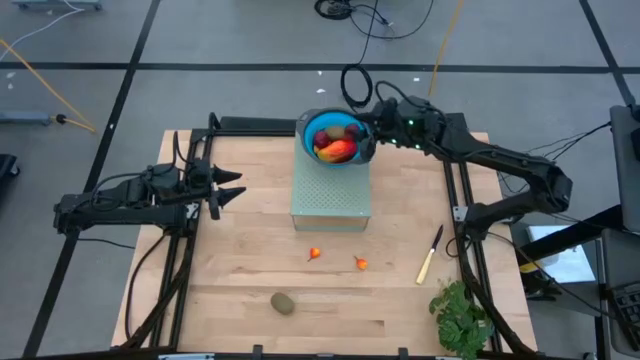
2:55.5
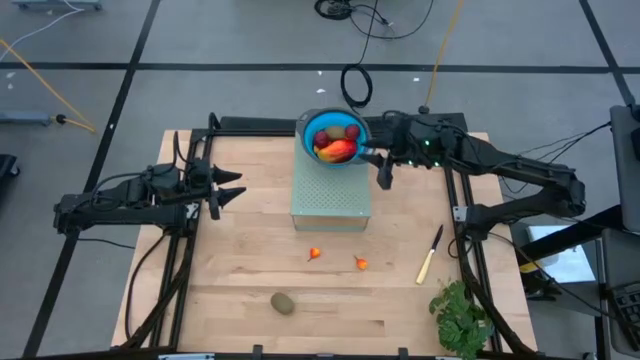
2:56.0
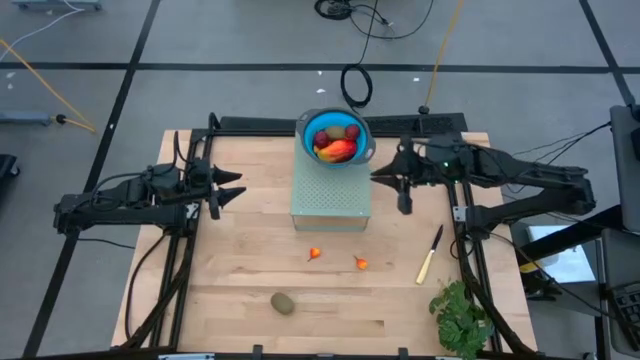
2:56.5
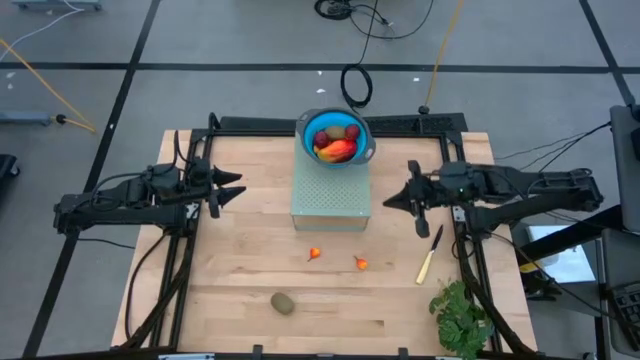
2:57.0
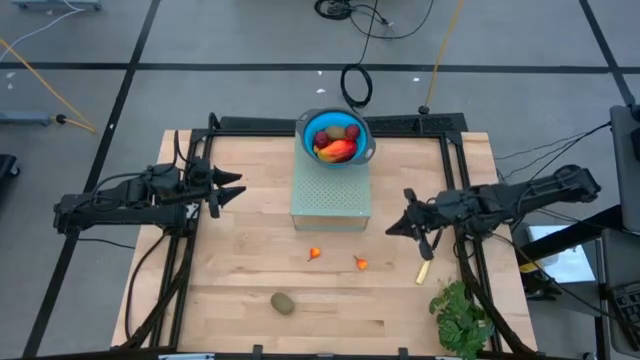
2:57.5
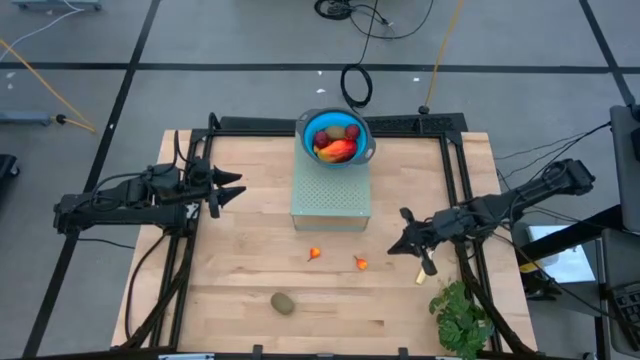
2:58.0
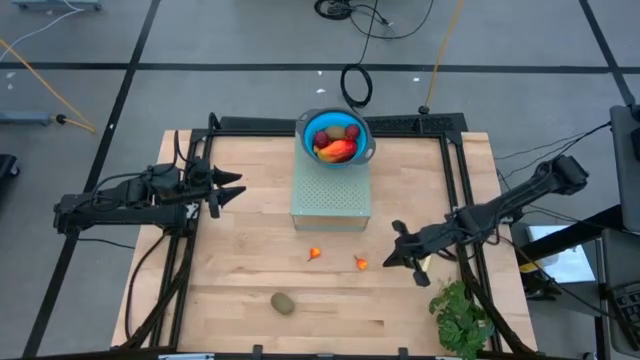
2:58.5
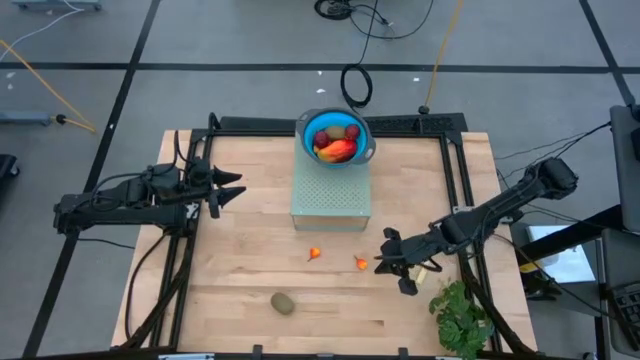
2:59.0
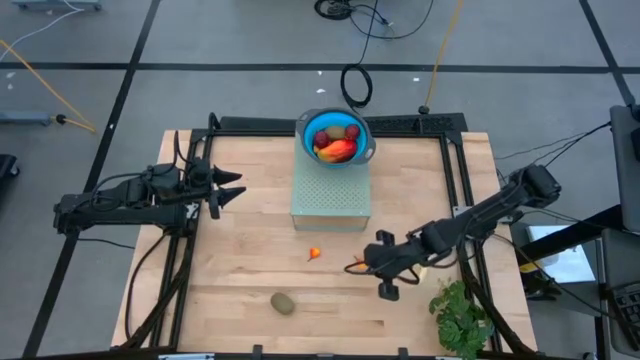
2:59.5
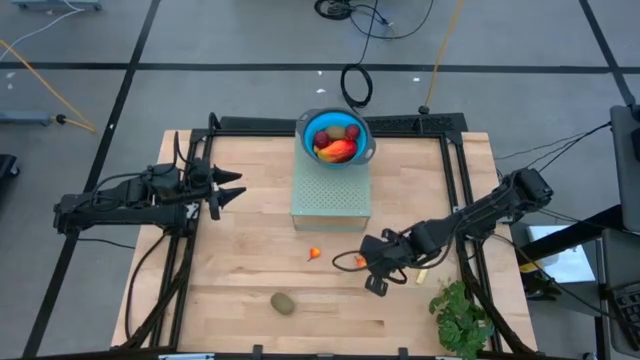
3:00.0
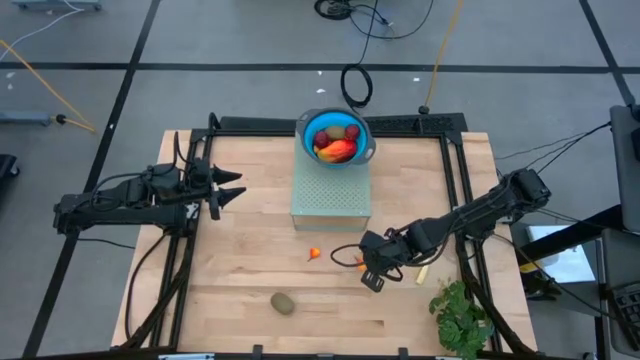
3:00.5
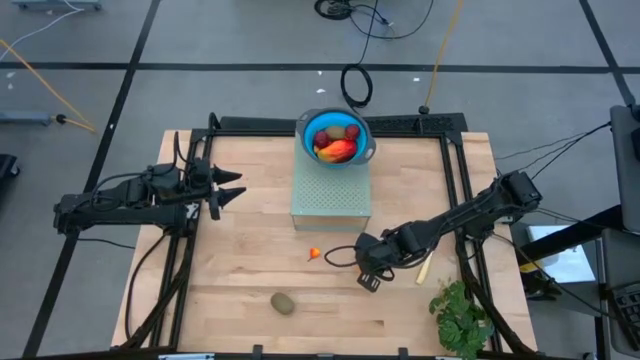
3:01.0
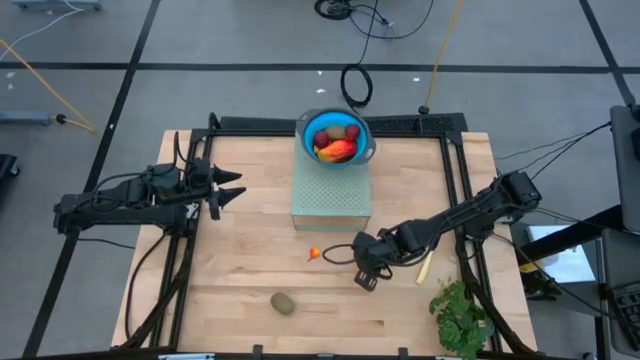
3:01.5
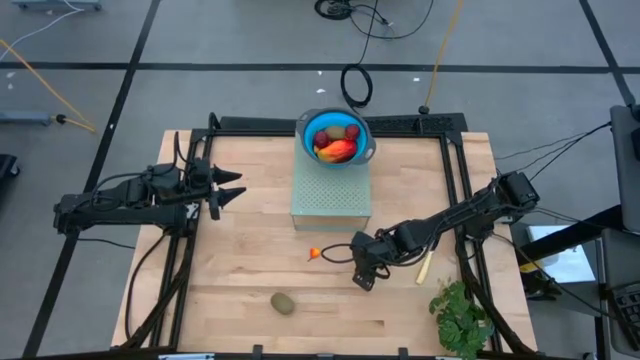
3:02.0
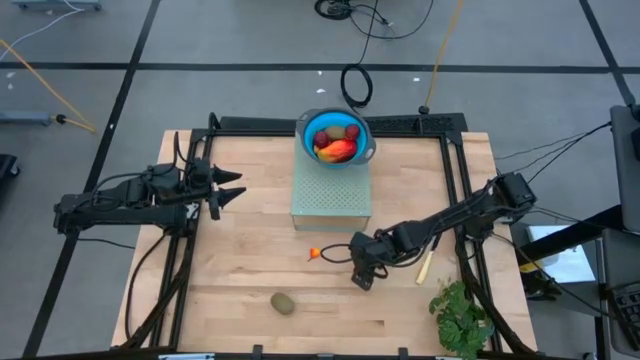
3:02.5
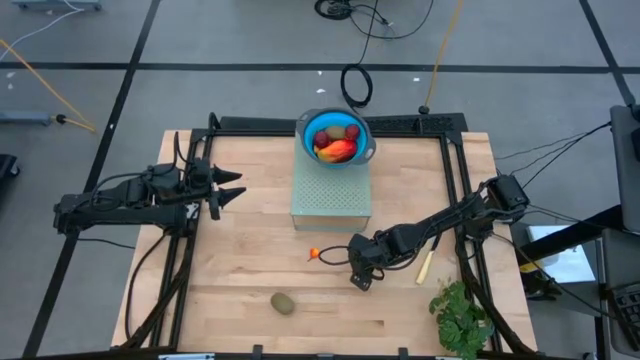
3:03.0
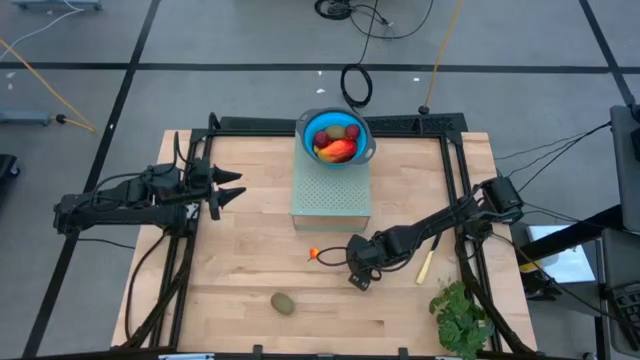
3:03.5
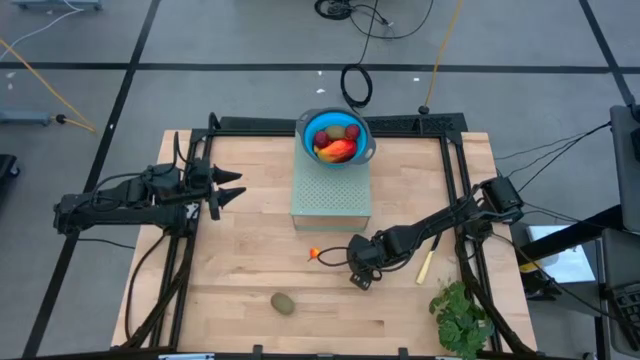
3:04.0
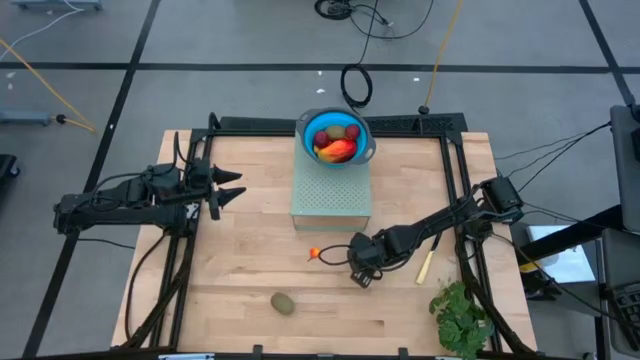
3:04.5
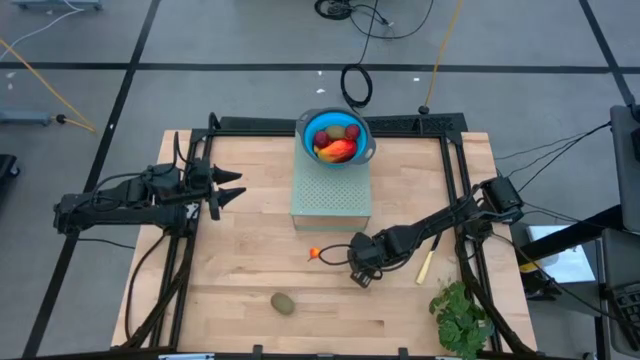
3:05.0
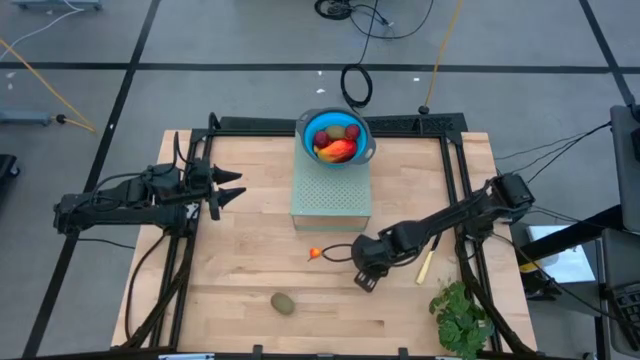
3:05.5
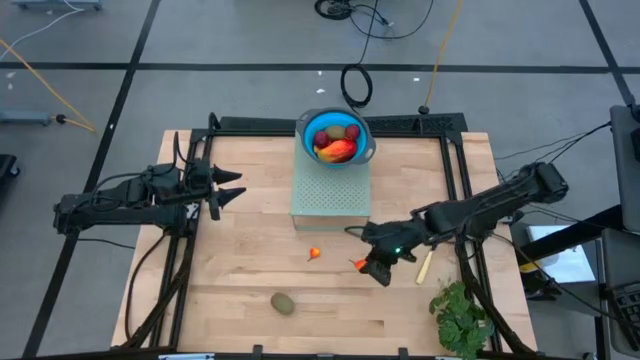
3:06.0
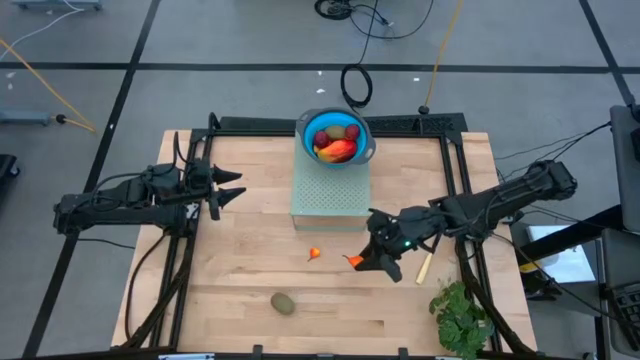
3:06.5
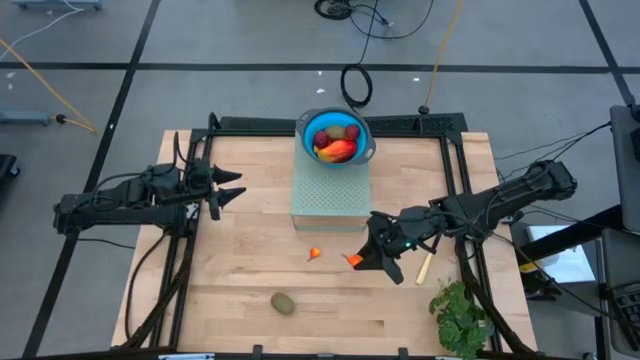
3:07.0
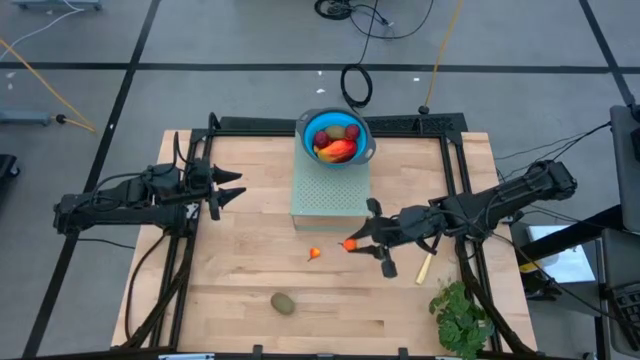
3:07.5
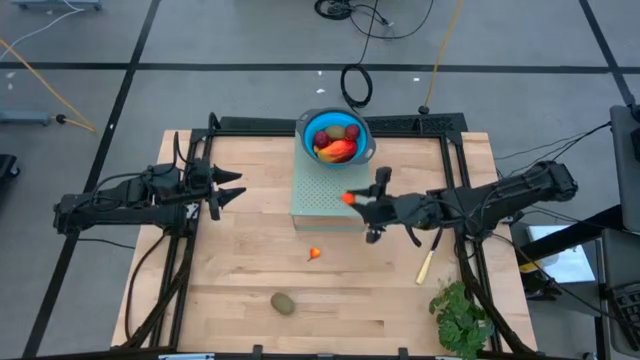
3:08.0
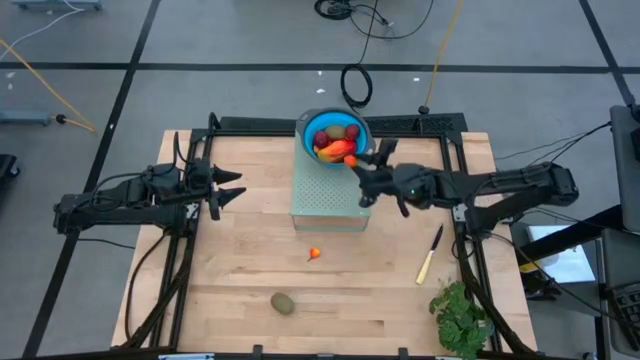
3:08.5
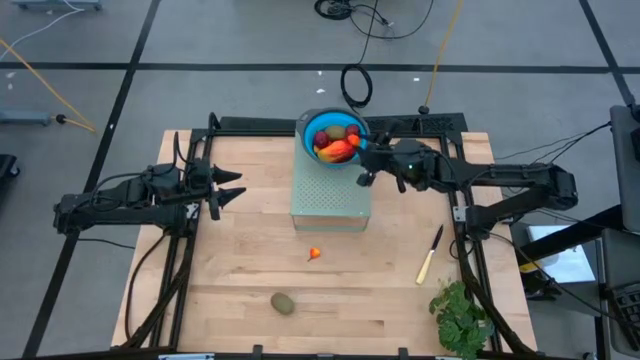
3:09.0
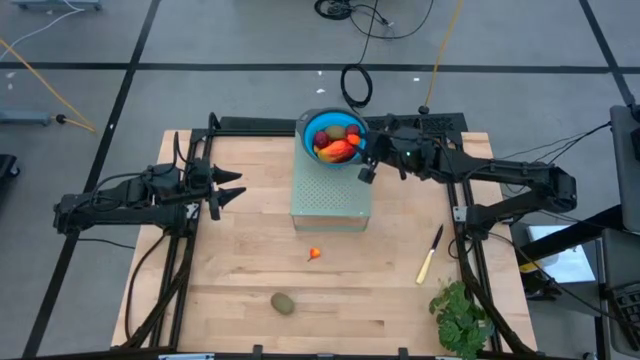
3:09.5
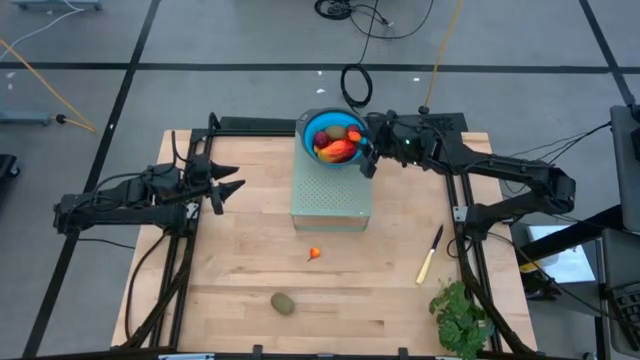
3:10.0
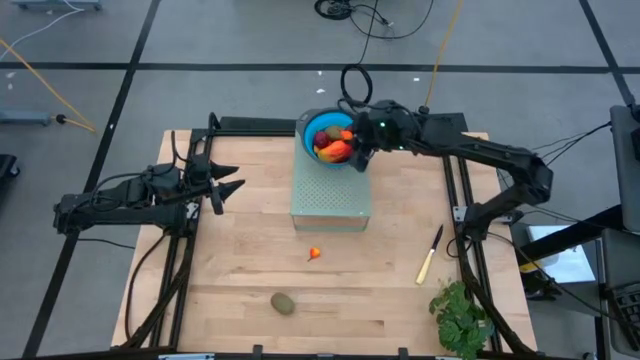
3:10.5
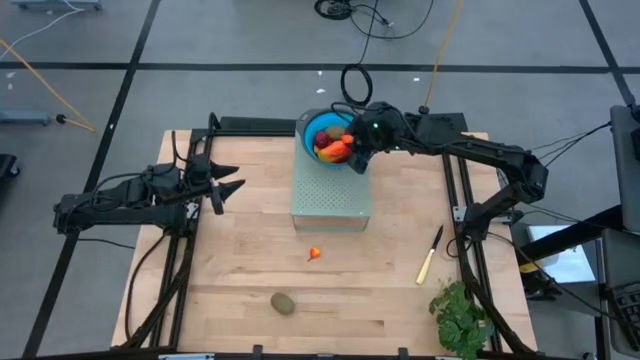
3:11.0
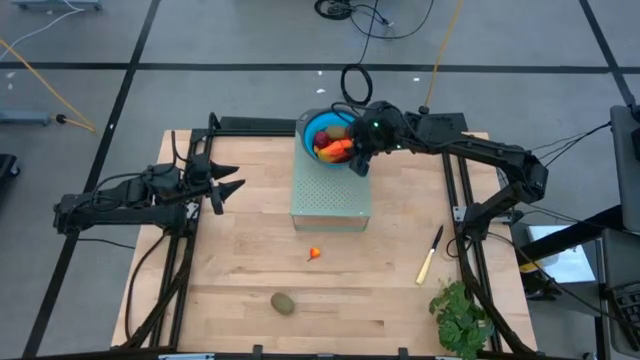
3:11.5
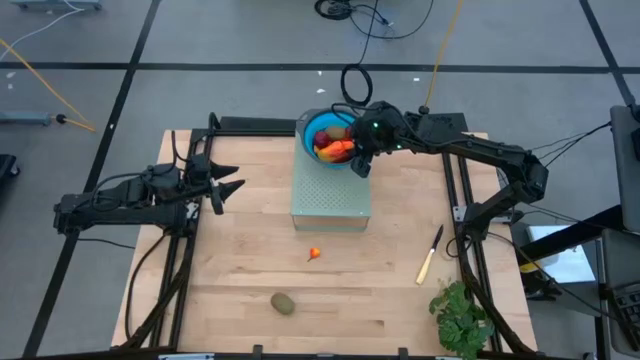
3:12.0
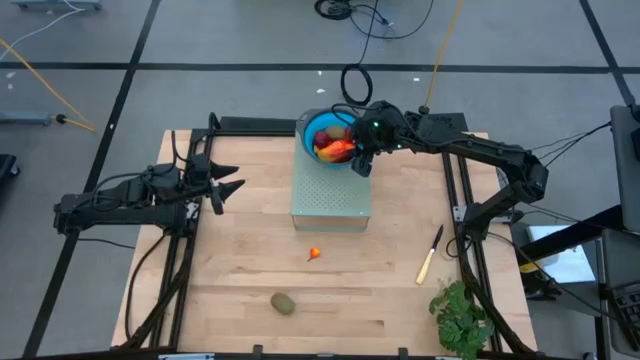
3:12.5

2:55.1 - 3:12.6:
Task: Pick & Place Fruit
Put the pear into the blue strainer bowl on the shelf

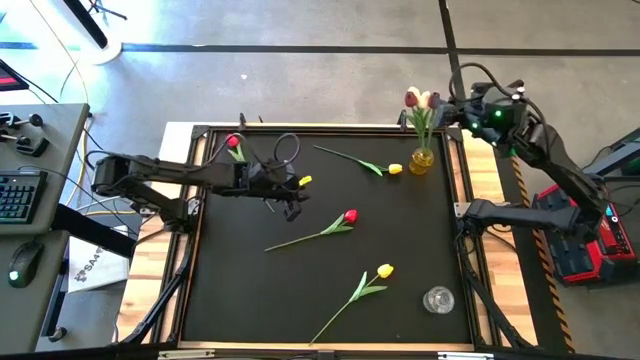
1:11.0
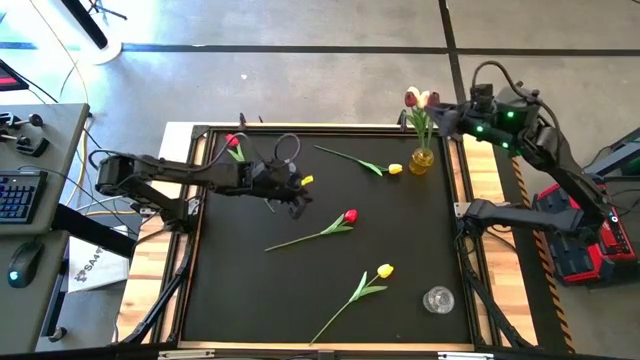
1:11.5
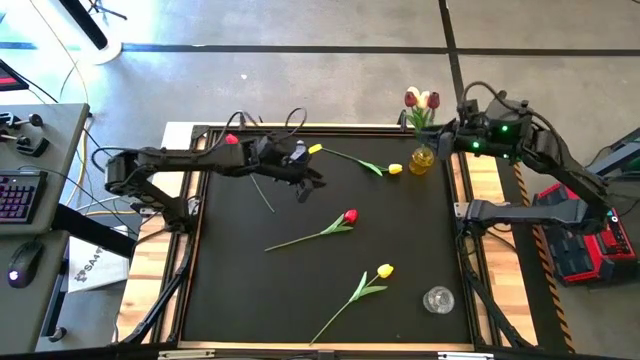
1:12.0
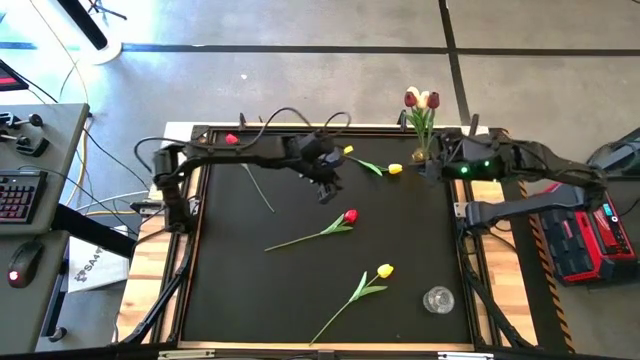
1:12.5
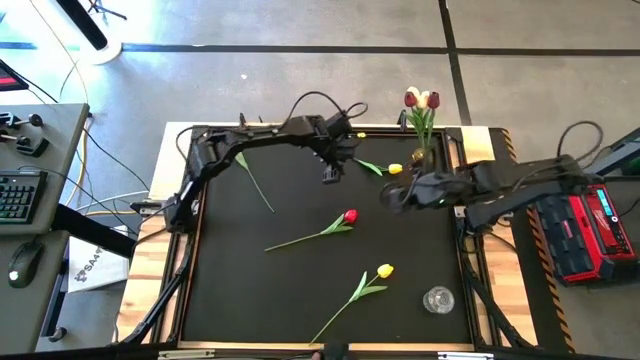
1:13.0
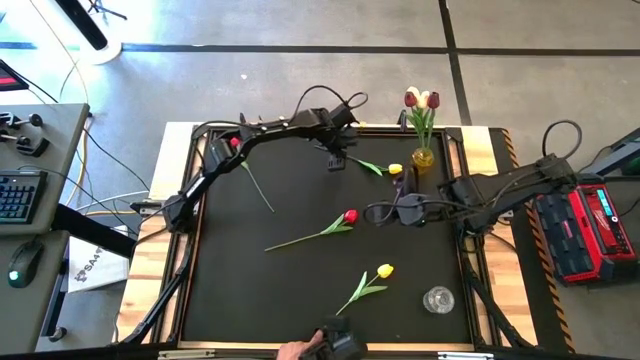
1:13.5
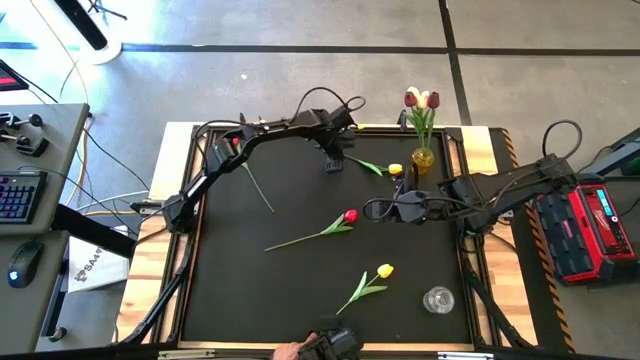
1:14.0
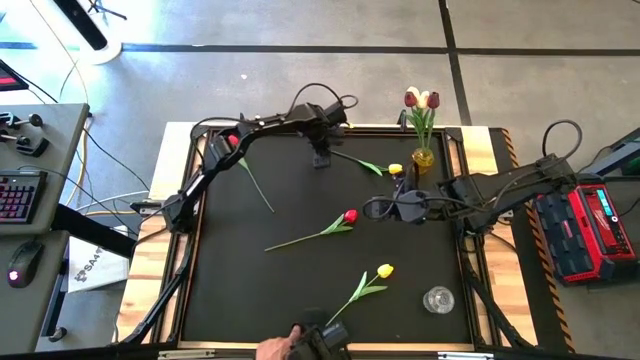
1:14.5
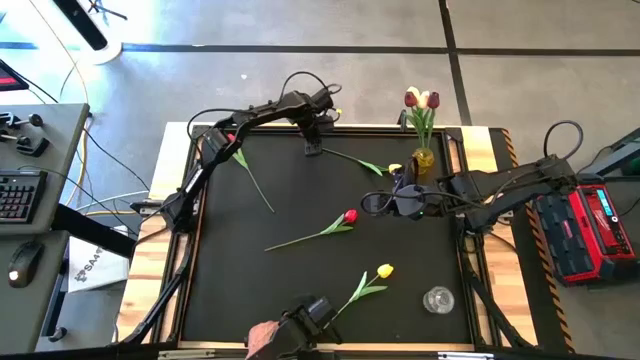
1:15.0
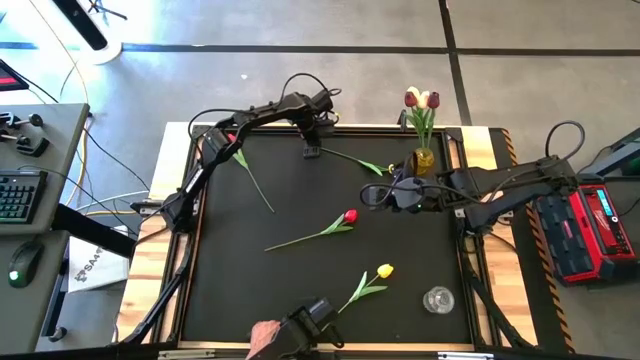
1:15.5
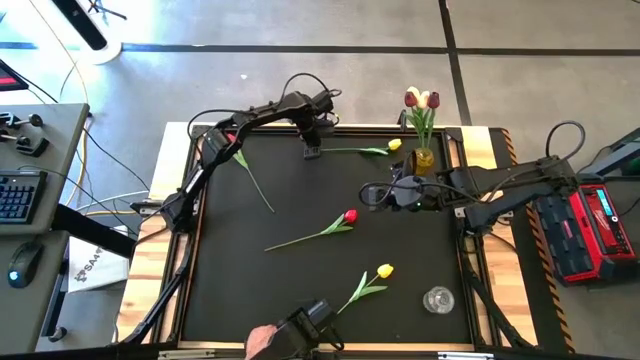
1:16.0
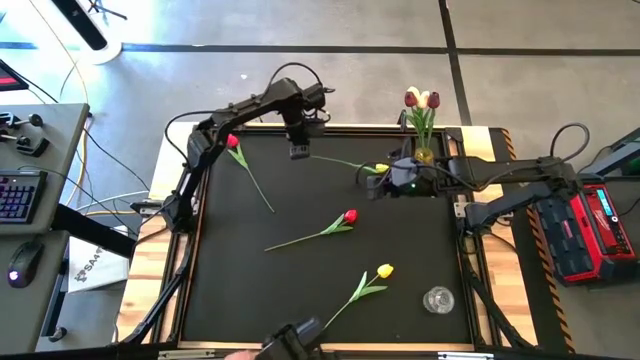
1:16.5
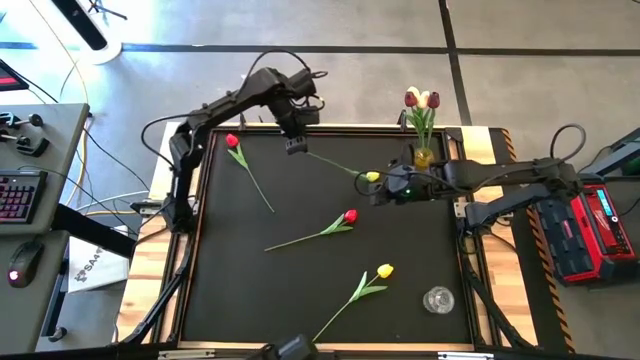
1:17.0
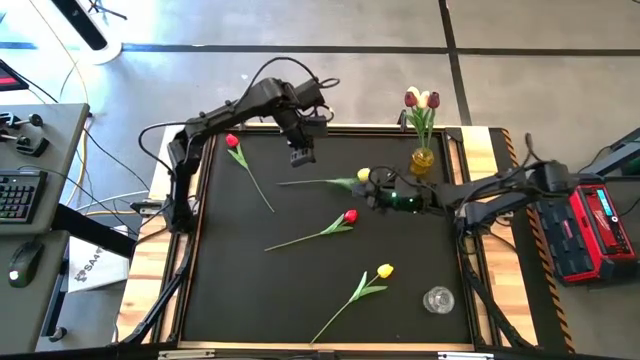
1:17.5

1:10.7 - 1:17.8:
Task: Sort flowers into vase by color
Put the top yellow flower into the transparent flower vase
